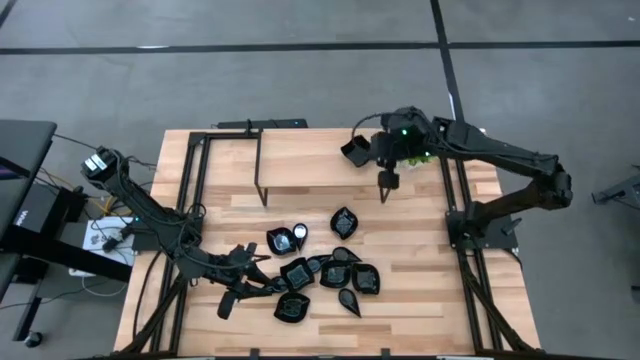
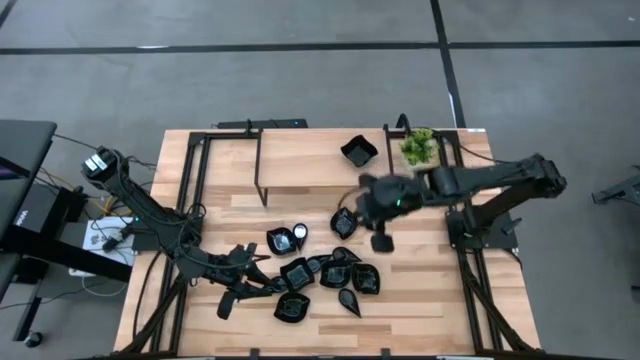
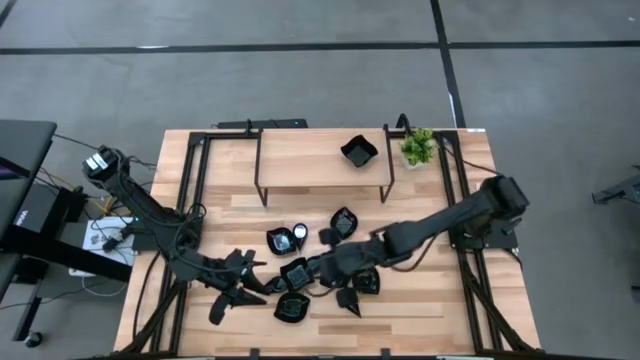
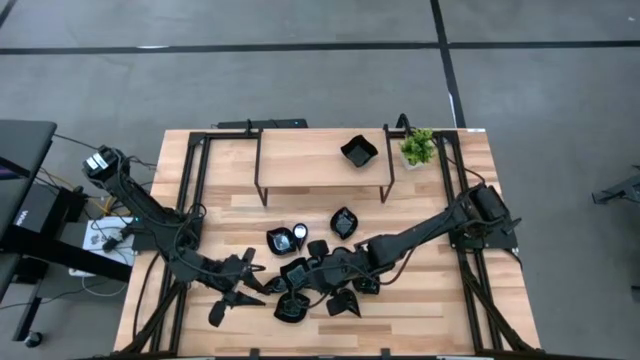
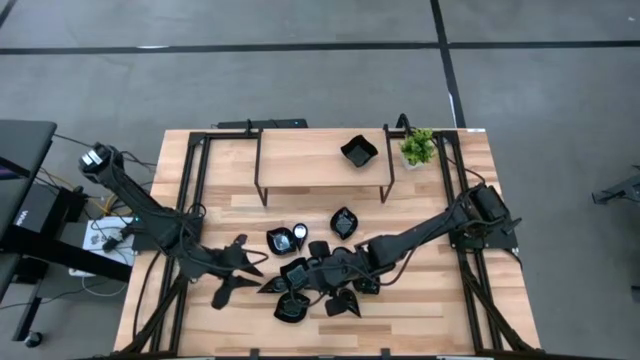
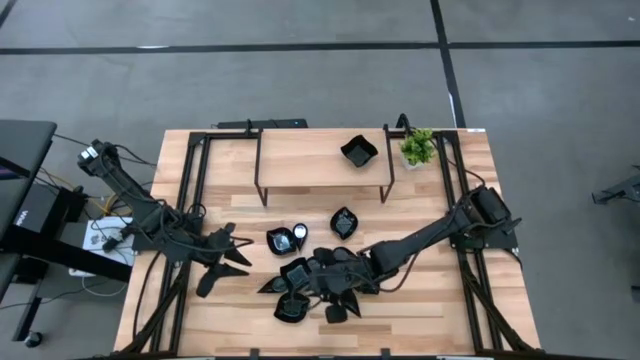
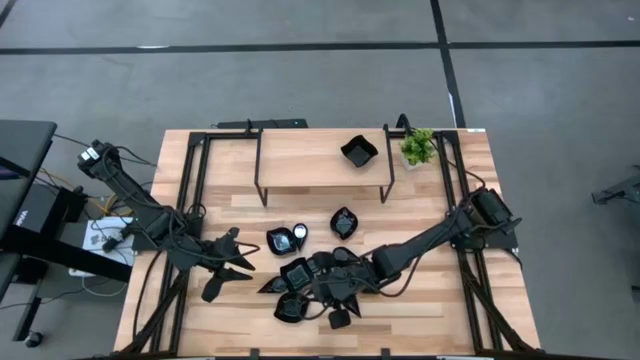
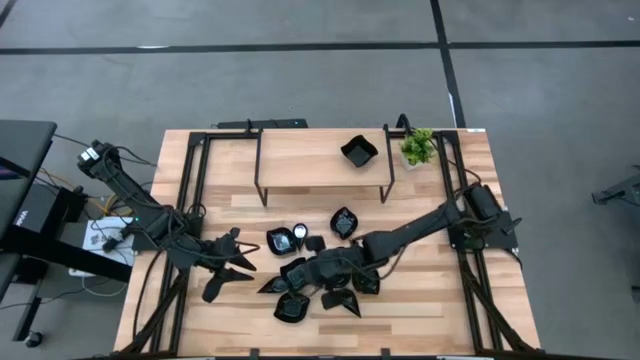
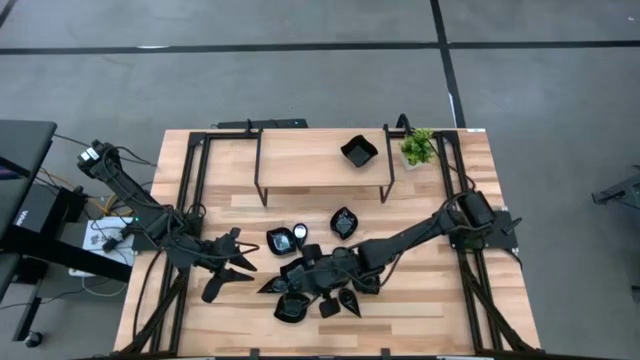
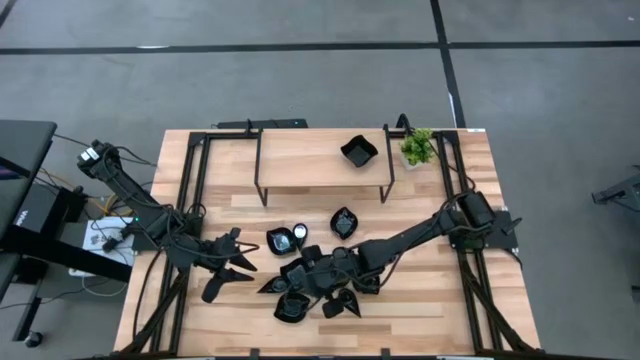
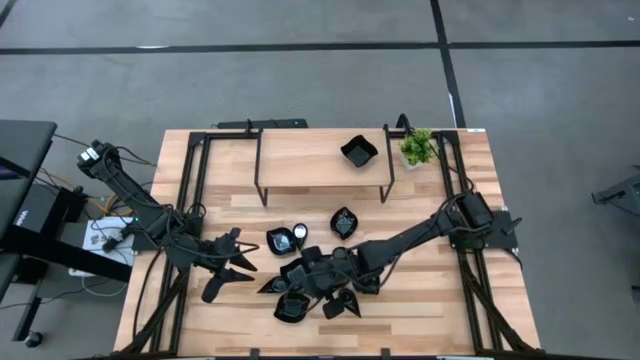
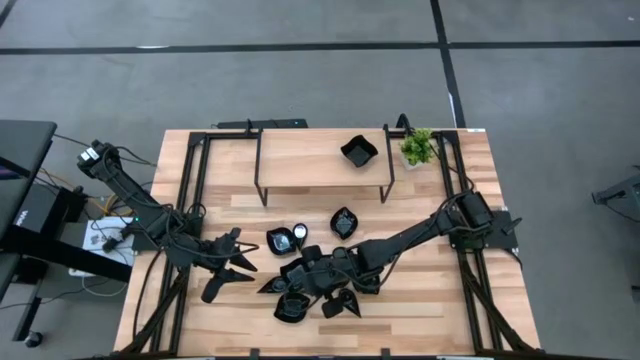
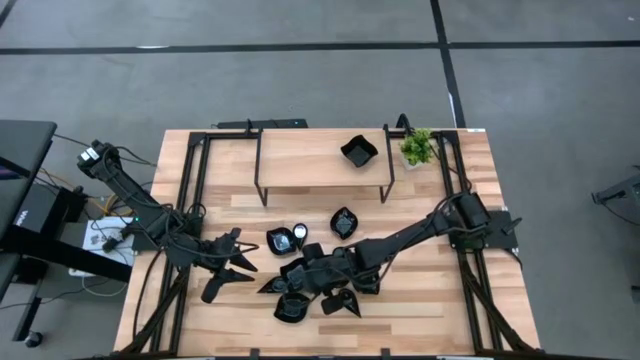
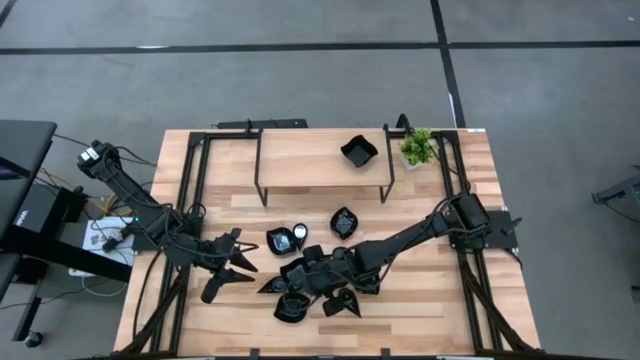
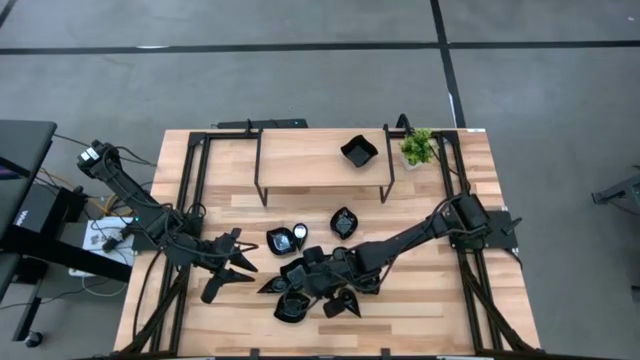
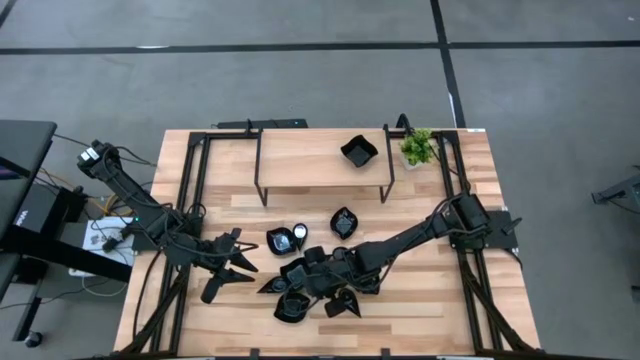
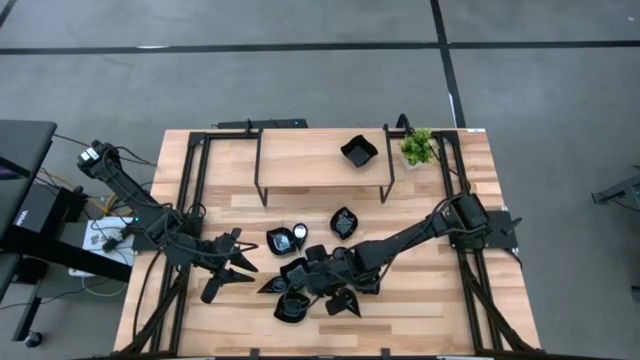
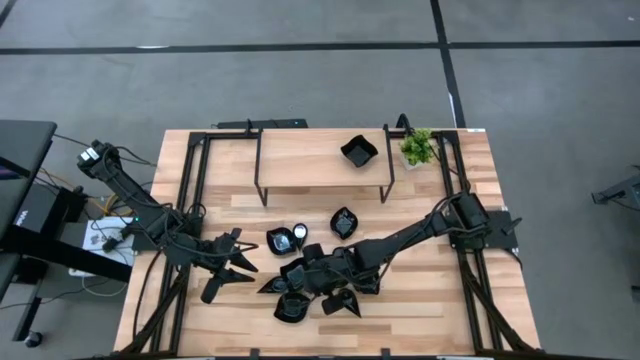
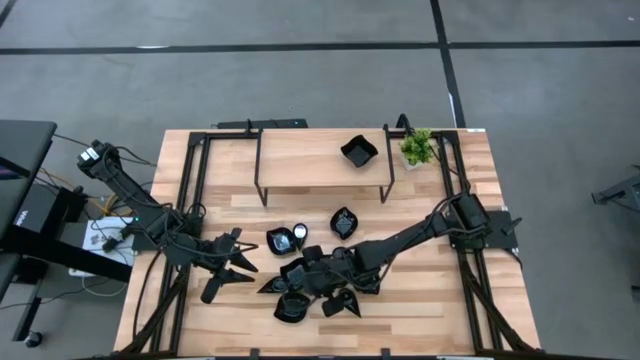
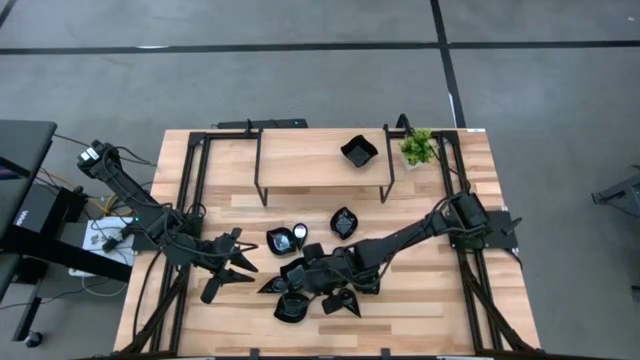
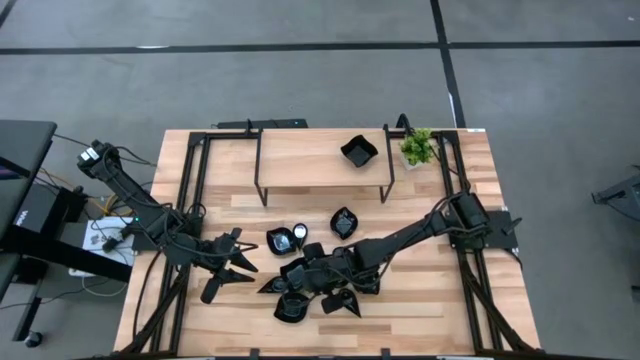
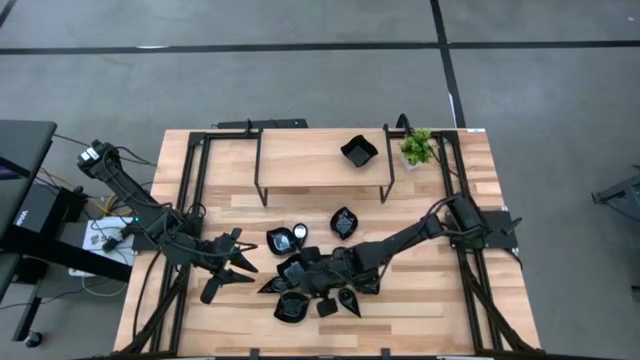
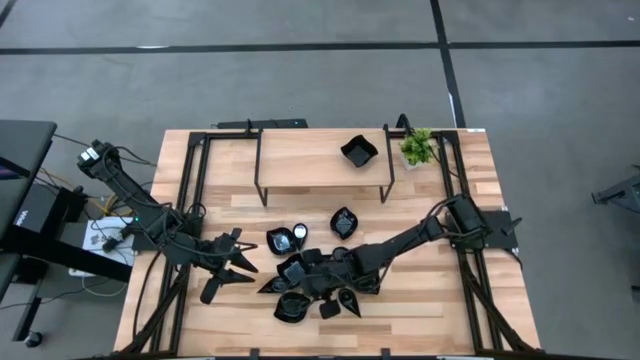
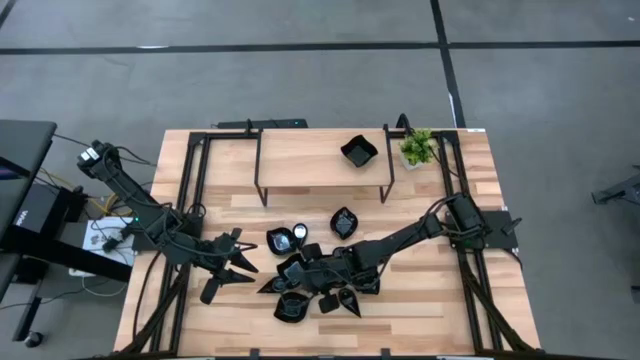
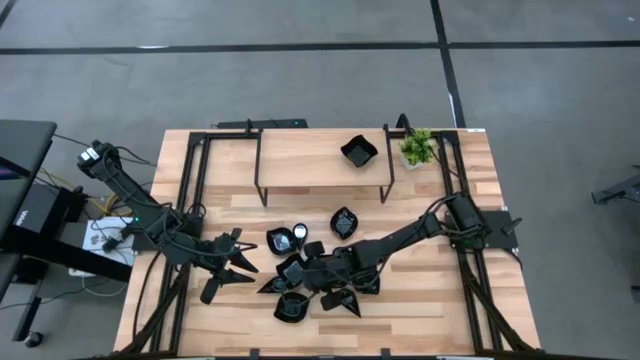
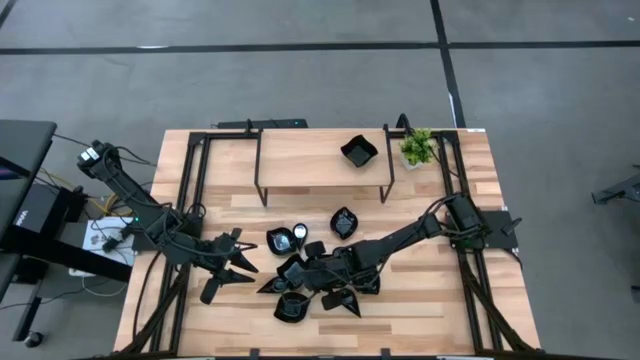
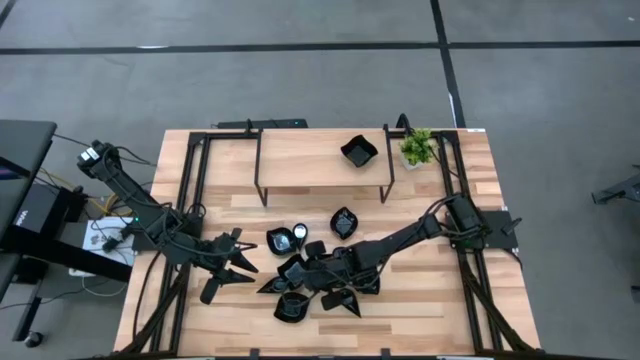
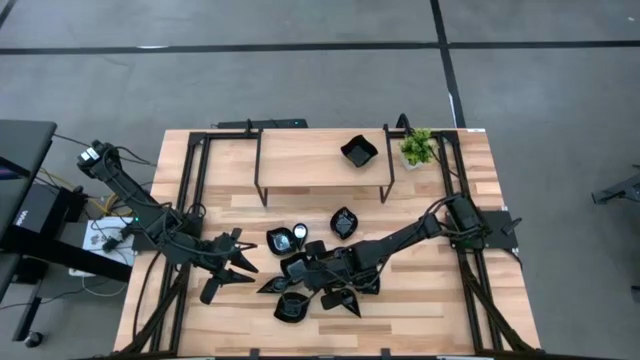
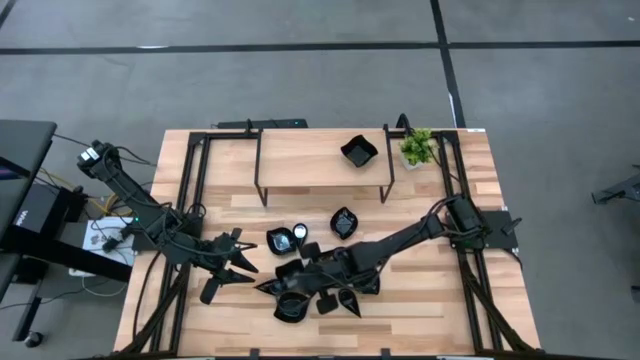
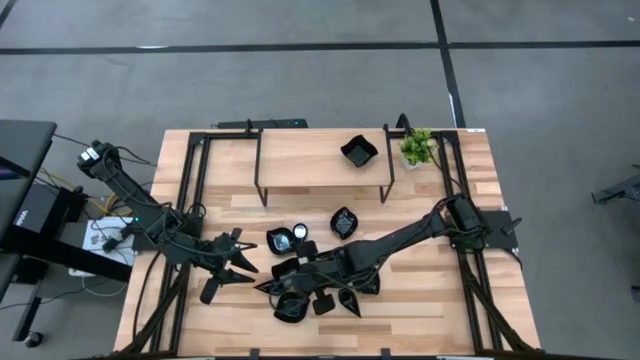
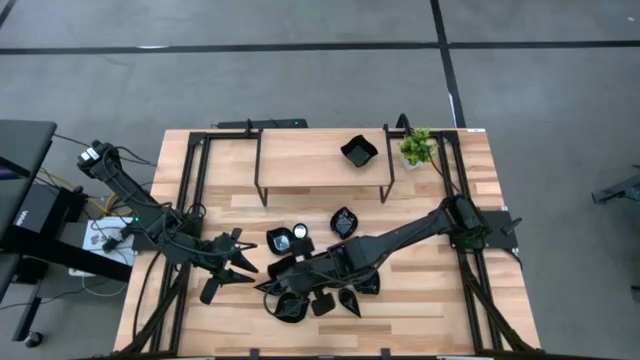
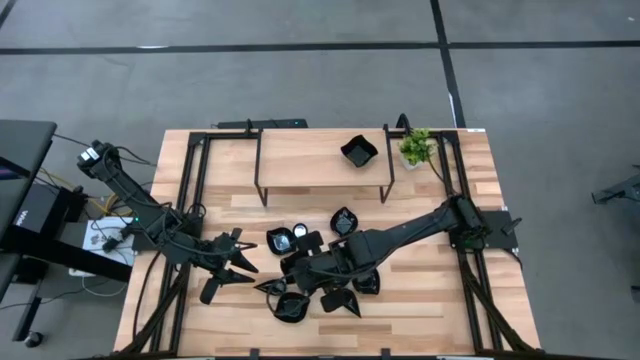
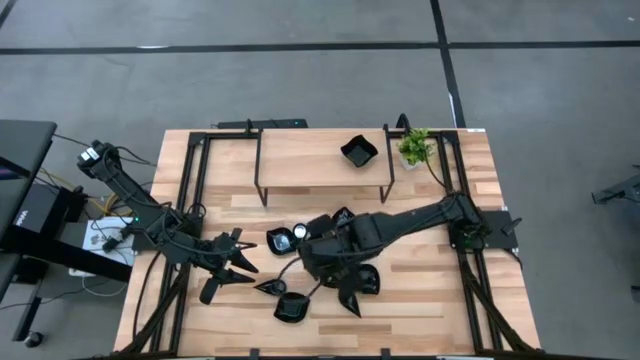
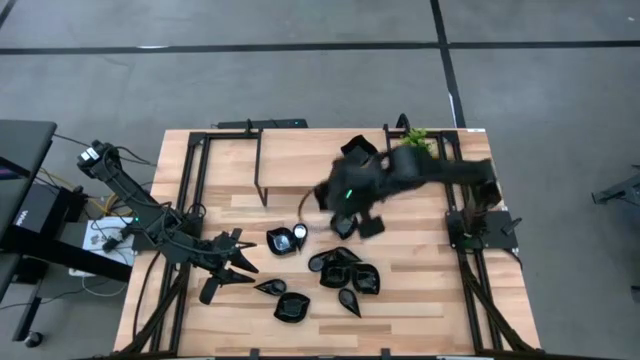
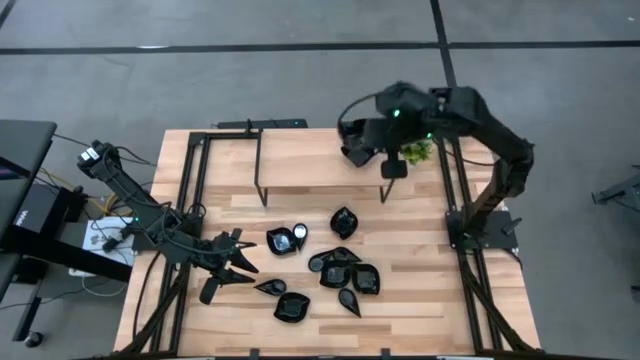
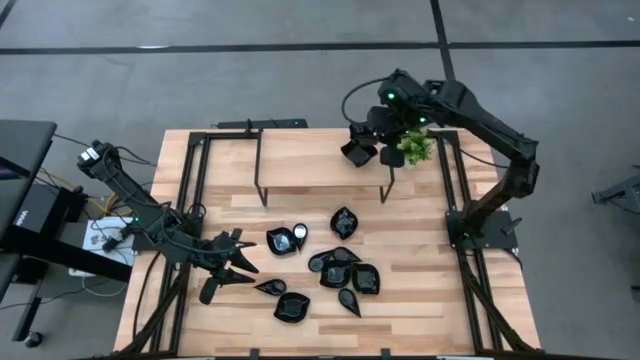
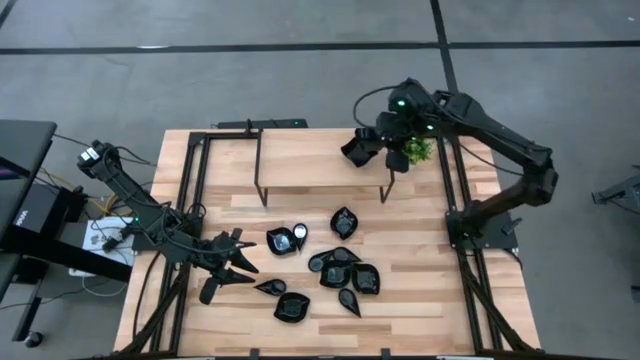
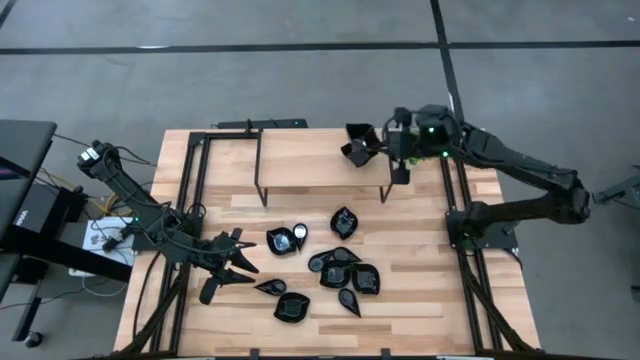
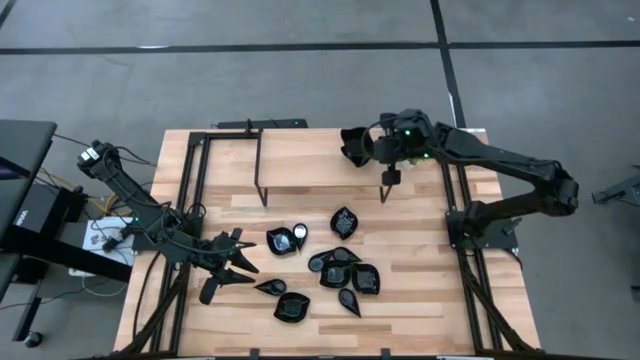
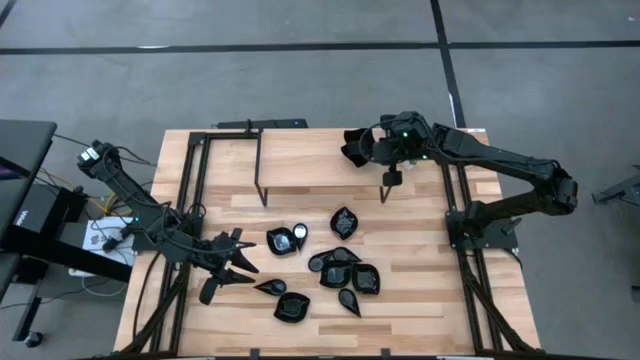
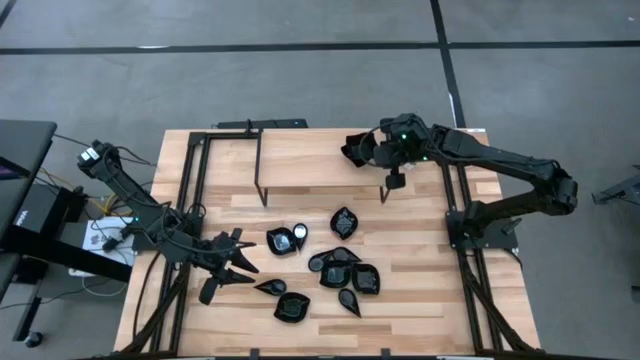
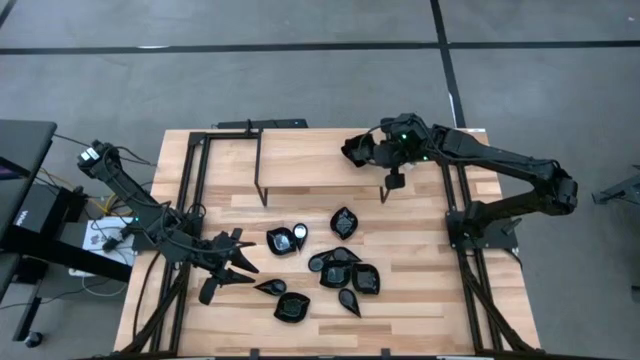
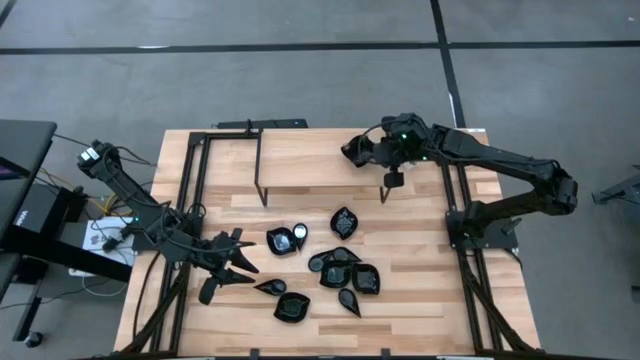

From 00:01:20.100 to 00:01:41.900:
Task: Pick & Place Mini shaped plates
Stack the black distorted square plate on the black distorted square plate on the shelf
